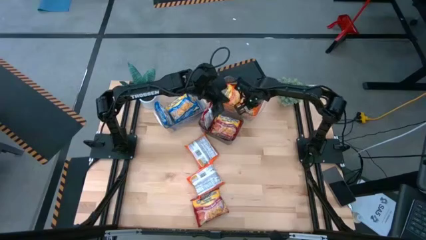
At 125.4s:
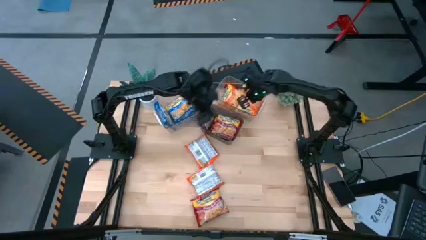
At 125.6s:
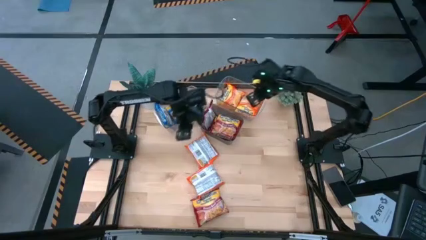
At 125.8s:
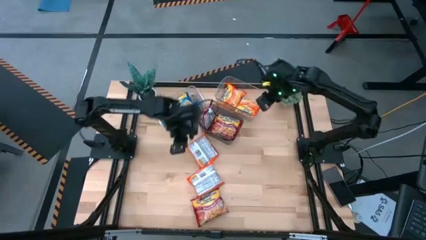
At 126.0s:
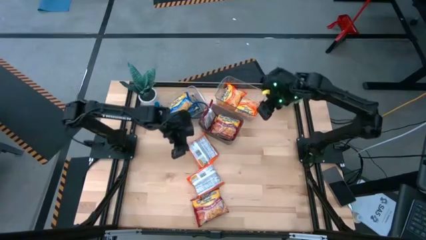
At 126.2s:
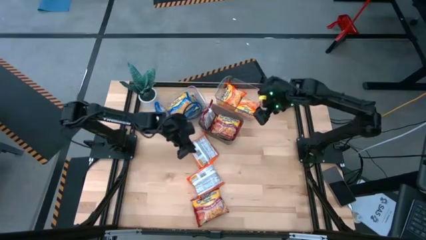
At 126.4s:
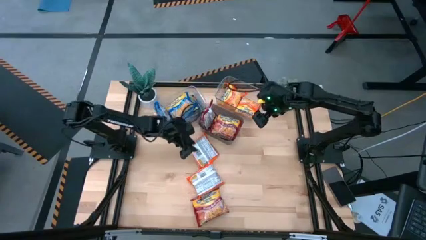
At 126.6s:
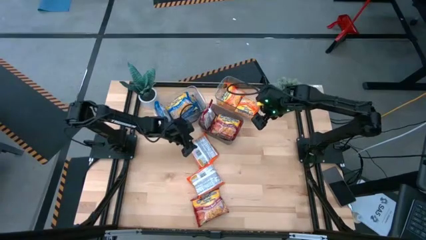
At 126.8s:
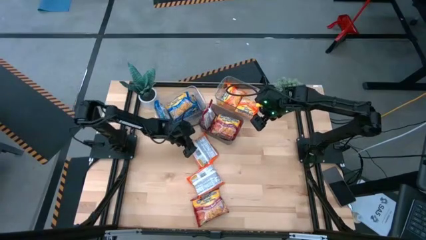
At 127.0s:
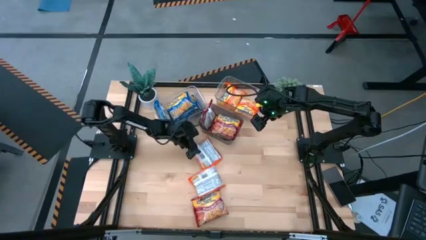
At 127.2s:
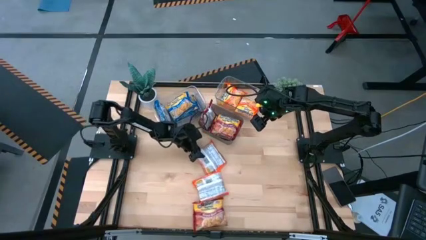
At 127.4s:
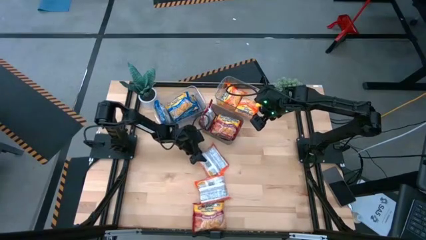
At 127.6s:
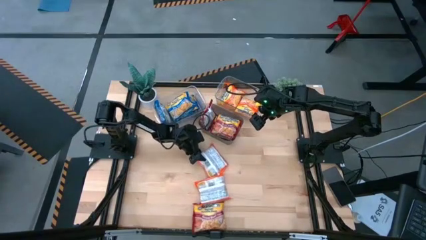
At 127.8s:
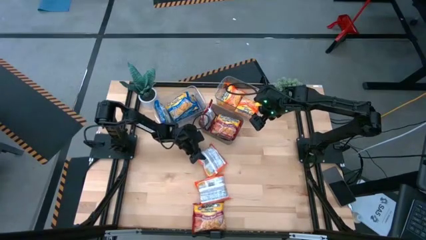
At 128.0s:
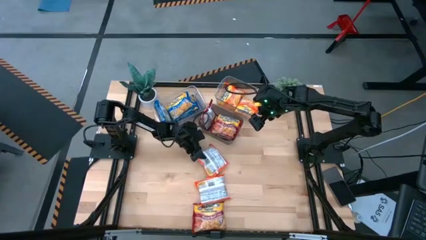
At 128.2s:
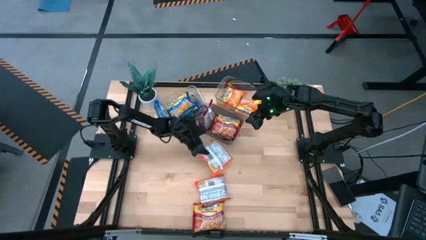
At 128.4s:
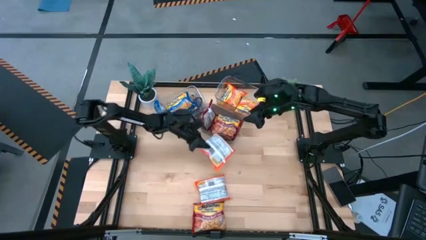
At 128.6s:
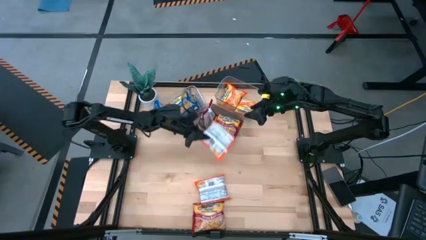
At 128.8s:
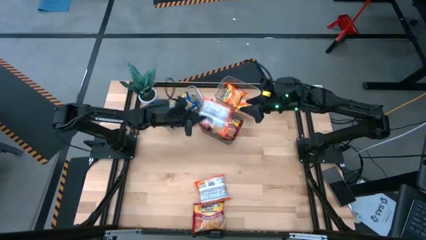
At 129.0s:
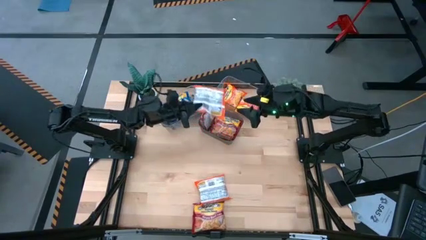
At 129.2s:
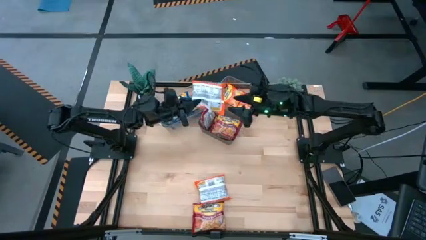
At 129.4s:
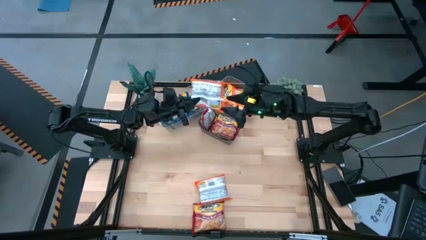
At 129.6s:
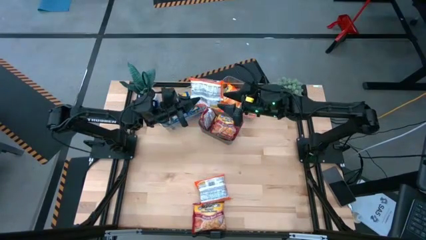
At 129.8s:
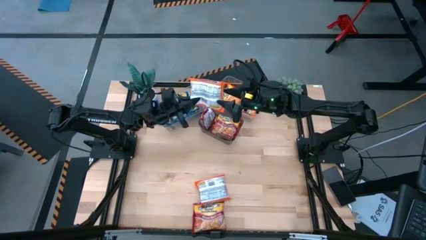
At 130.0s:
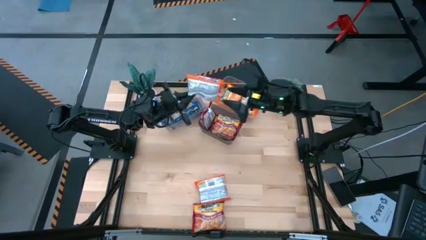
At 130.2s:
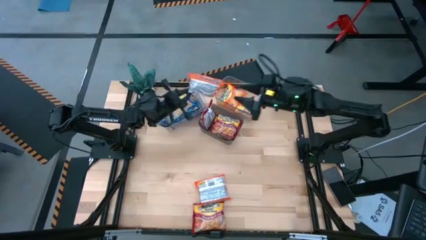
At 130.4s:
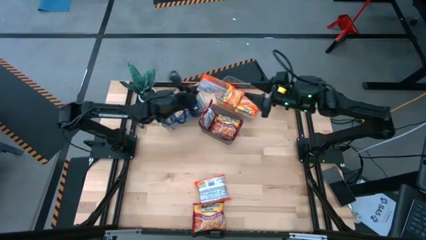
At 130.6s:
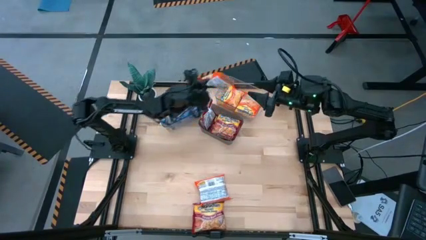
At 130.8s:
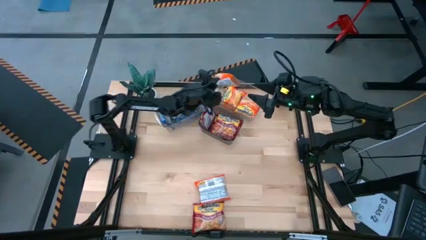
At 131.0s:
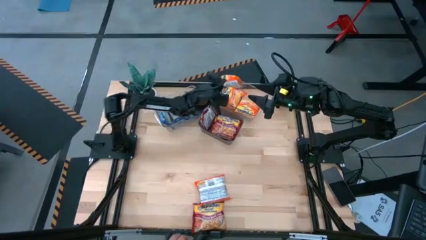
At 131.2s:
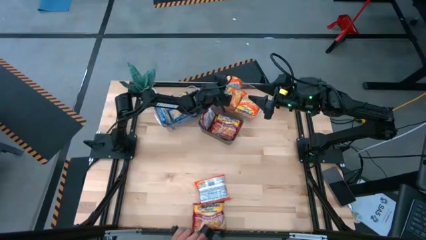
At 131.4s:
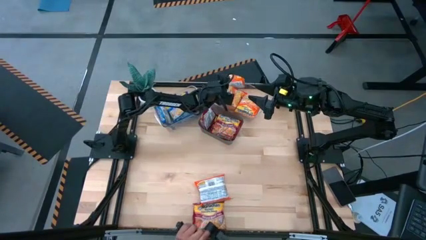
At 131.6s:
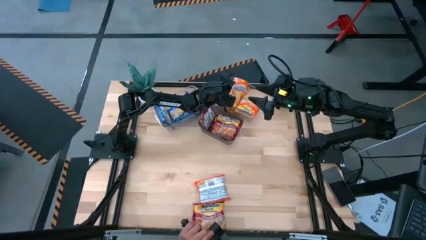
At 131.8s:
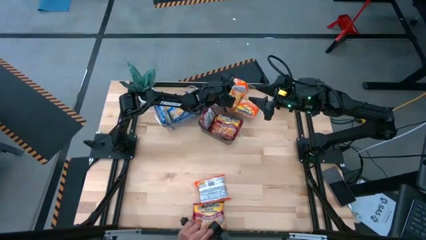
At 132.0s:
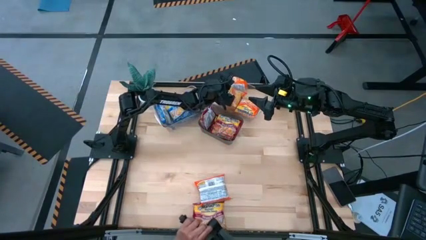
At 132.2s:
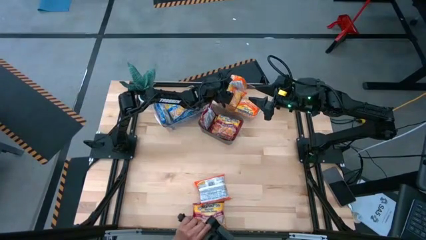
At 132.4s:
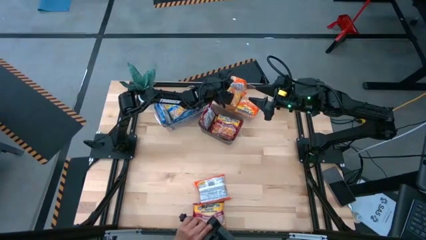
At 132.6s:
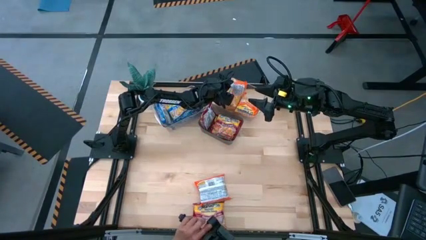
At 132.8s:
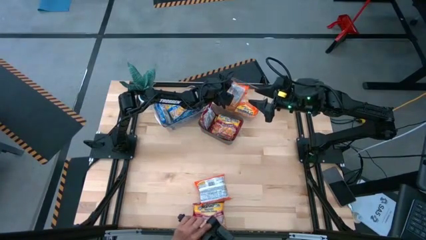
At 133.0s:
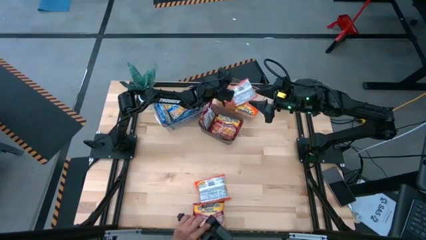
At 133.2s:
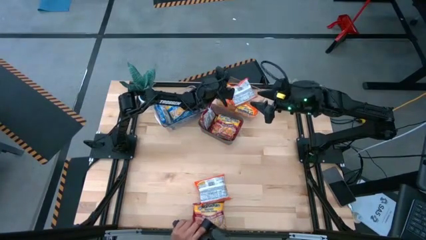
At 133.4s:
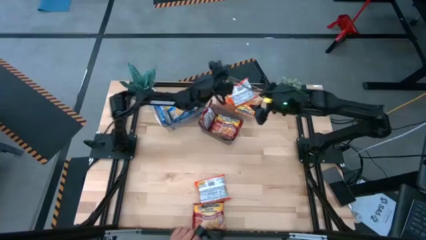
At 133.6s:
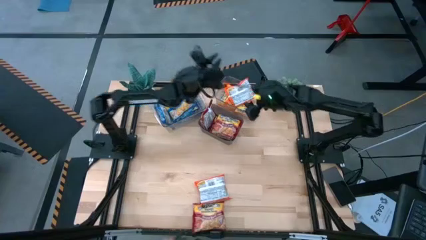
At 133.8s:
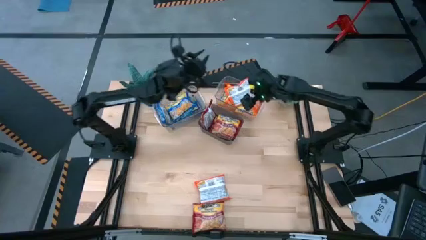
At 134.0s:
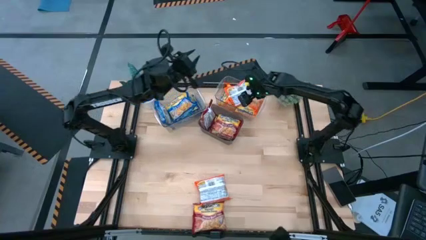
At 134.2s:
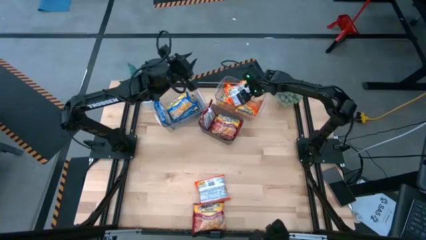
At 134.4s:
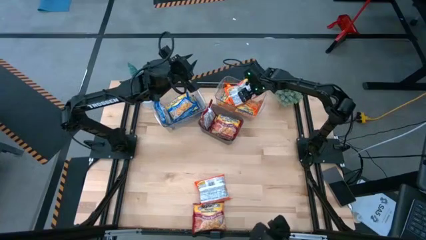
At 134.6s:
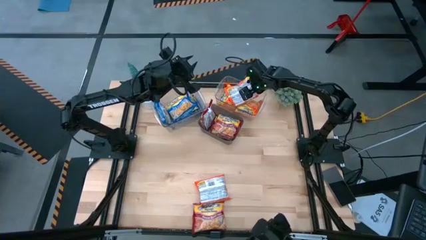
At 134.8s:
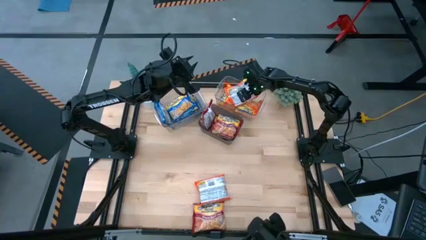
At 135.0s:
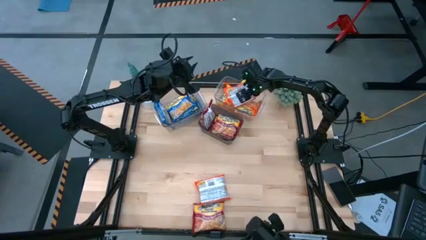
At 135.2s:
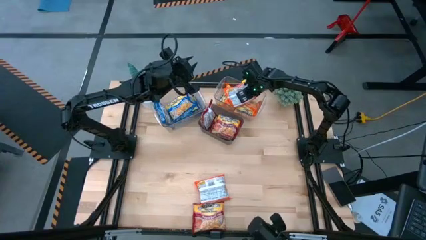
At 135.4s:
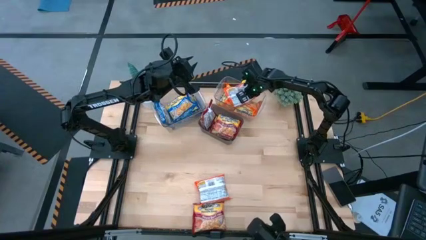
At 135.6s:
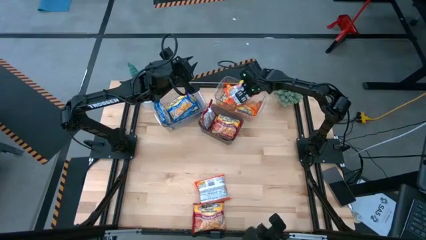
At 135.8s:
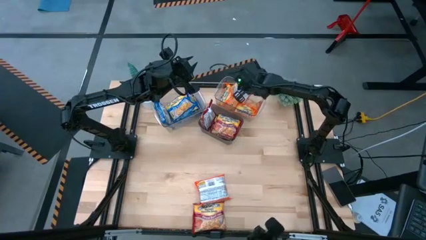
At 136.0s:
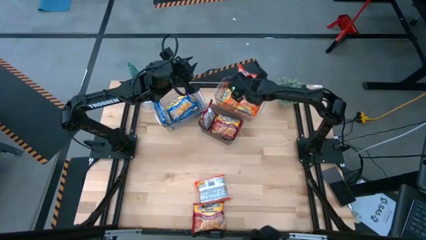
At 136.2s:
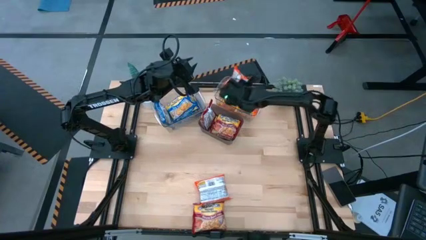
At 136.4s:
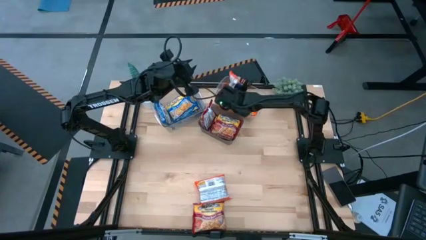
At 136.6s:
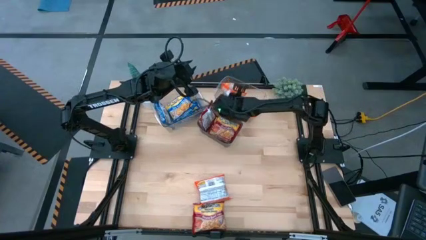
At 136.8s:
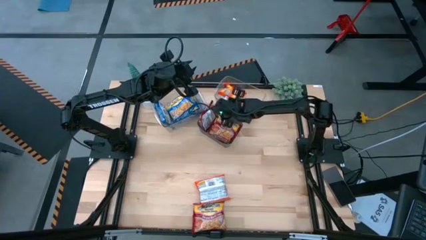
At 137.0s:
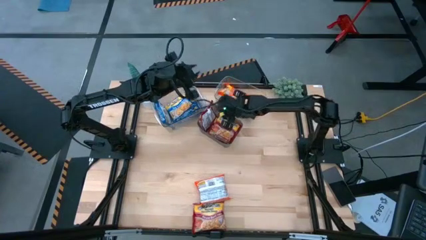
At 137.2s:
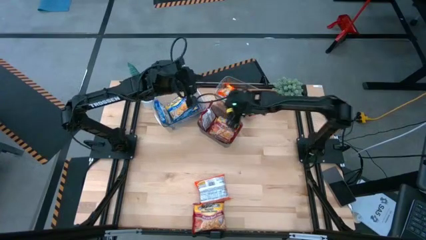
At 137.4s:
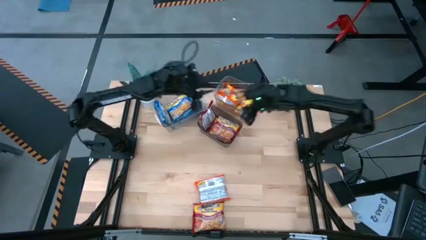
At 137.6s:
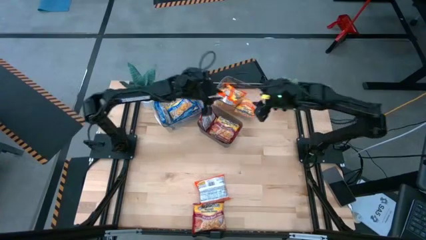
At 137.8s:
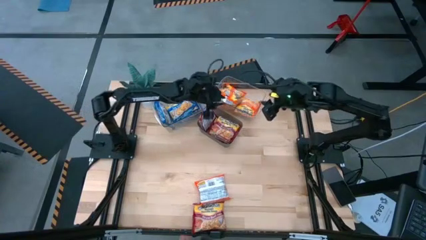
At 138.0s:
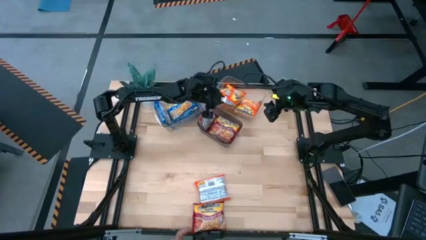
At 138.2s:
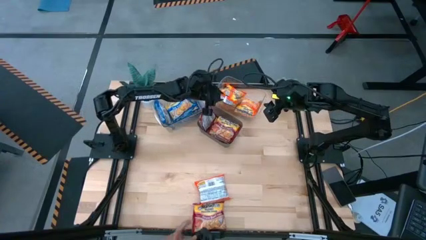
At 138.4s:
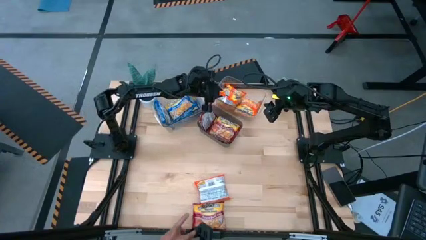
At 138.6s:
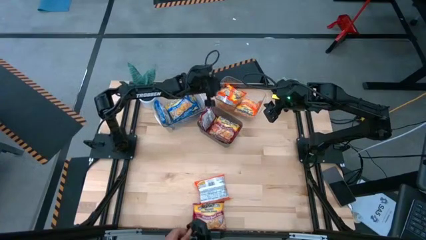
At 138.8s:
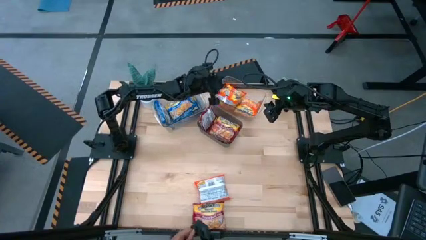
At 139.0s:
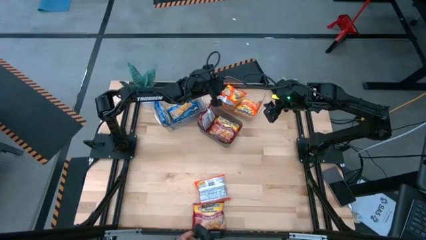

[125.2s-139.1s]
Task: Sort Maruchan noodles
Stack the orange noodle pack on top of the orange noodle pack

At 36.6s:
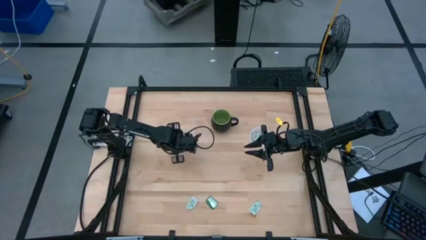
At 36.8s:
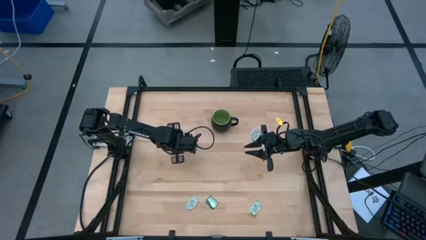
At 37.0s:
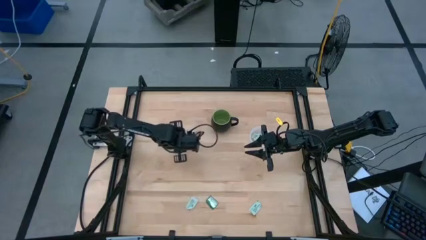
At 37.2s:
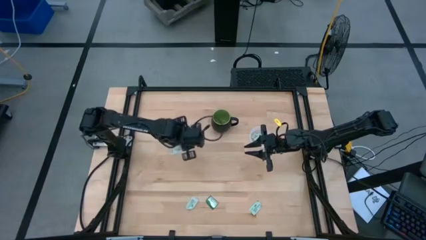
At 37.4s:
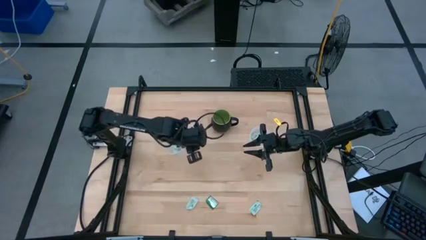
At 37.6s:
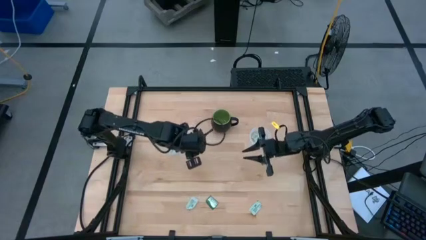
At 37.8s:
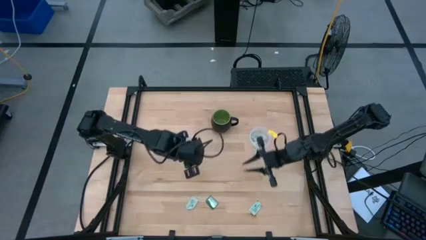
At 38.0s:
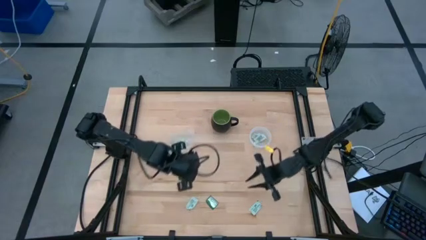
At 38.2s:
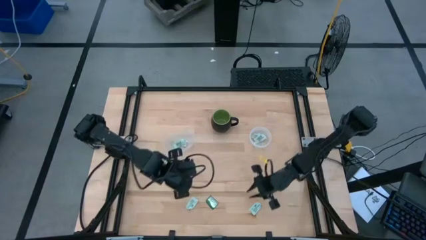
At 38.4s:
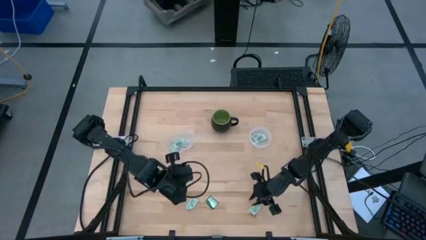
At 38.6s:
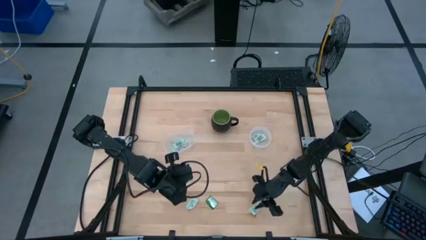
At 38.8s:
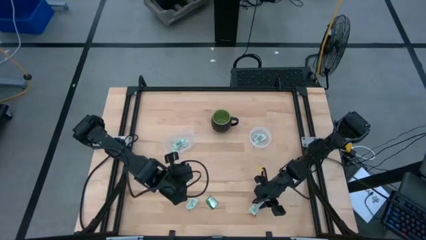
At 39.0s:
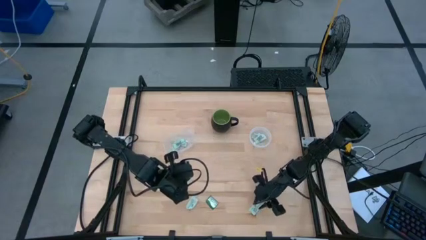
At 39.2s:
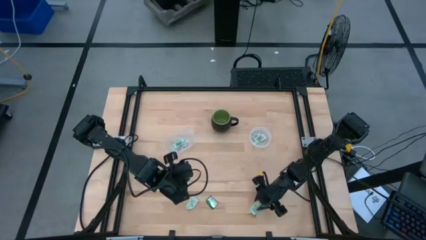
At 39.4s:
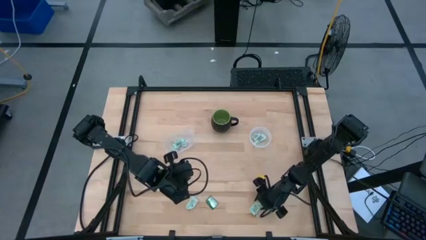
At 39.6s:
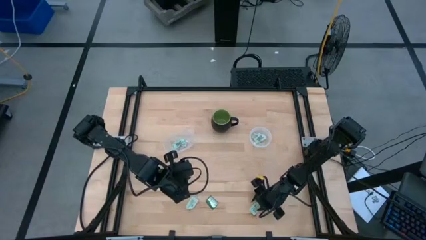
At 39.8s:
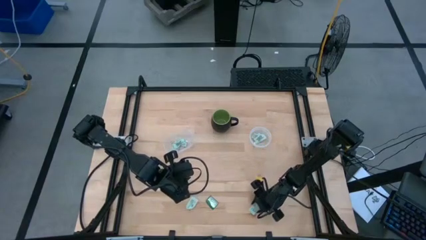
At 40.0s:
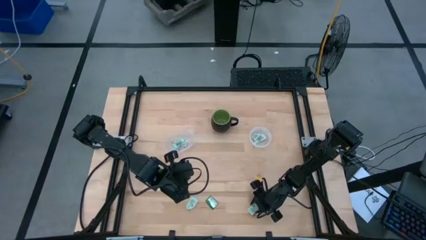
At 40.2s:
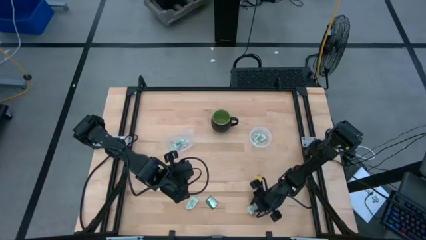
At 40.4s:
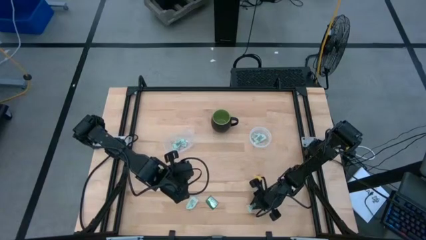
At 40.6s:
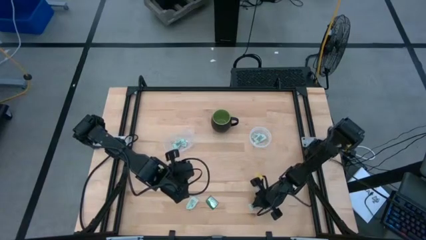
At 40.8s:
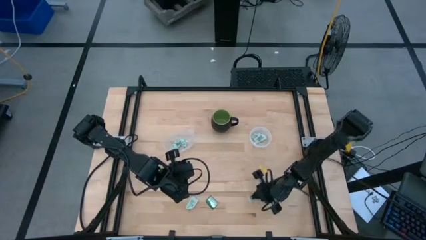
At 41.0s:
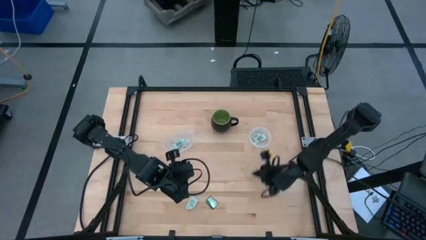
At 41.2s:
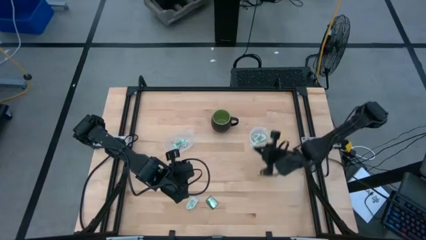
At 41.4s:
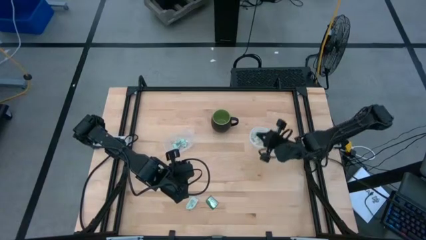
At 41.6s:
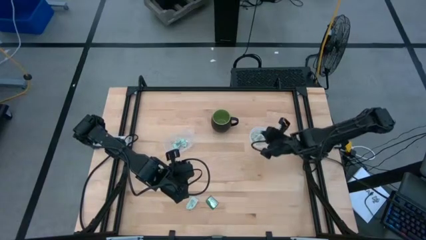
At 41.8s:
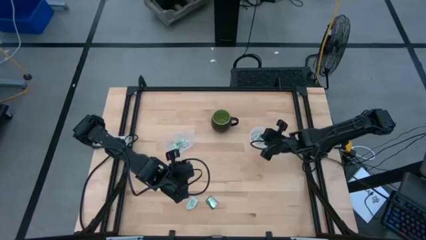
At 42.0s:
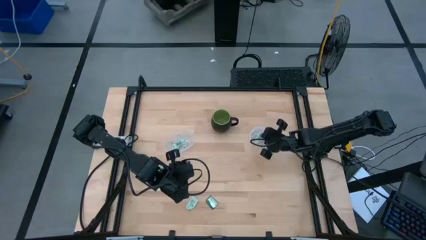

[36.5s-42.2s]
Task: Pick and place Stevia / Truvia into bins
Put the green stevia packet into the right transparent container
